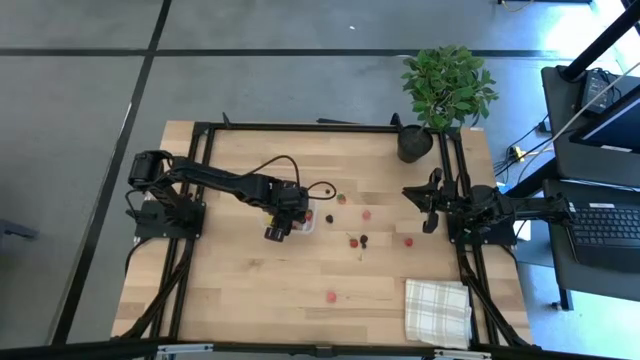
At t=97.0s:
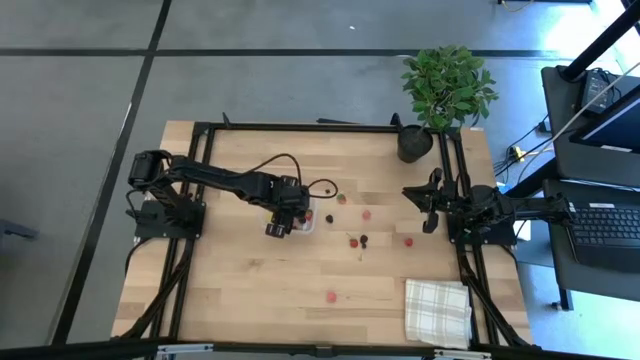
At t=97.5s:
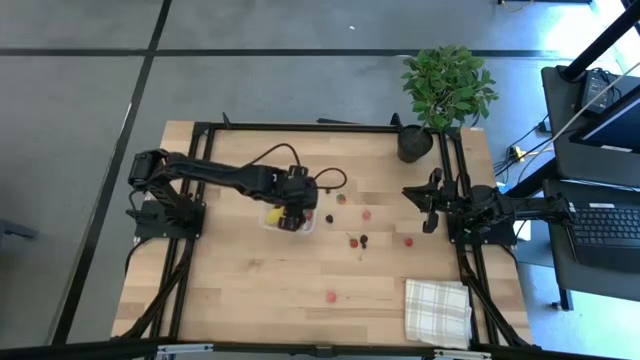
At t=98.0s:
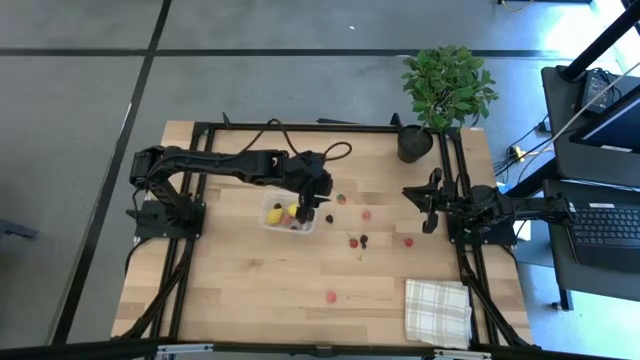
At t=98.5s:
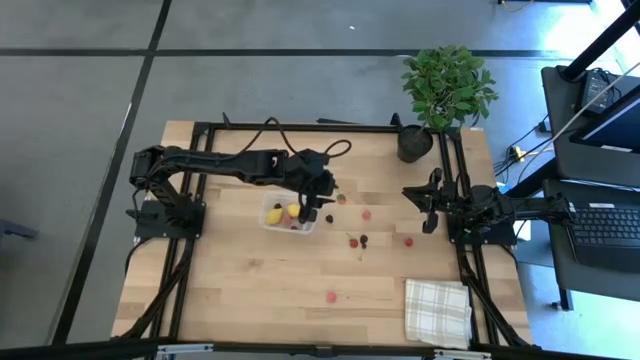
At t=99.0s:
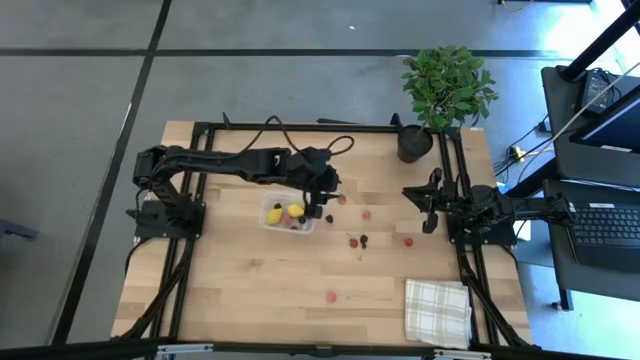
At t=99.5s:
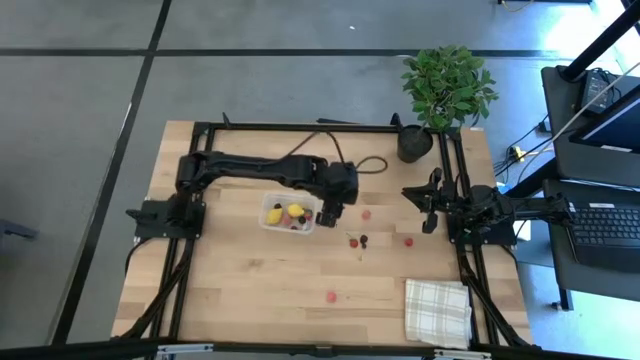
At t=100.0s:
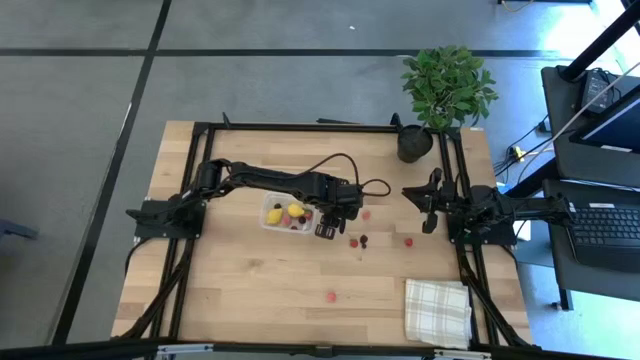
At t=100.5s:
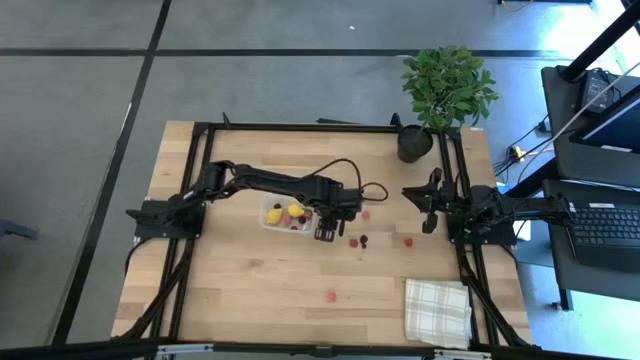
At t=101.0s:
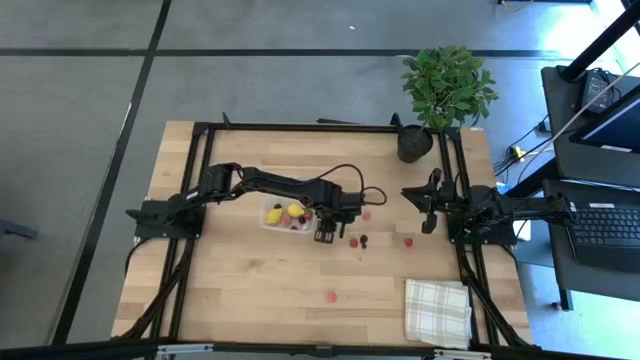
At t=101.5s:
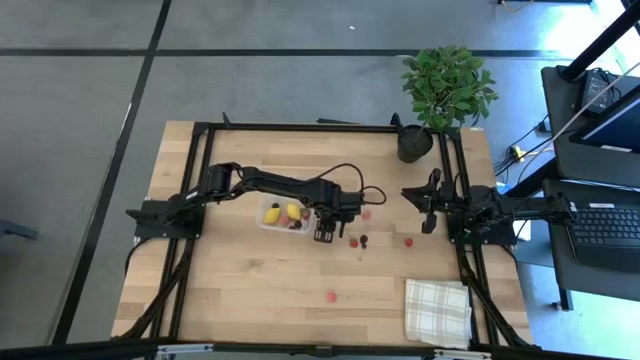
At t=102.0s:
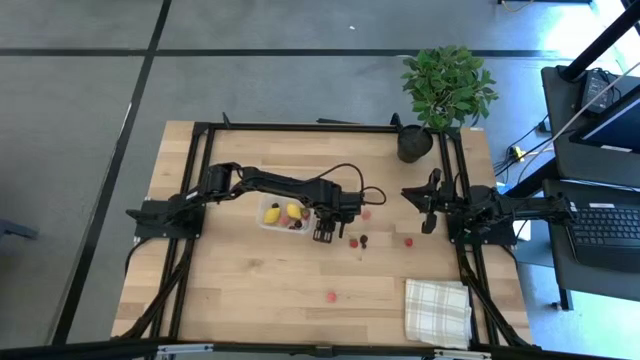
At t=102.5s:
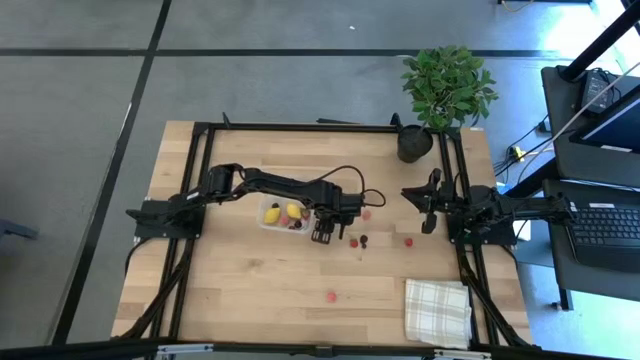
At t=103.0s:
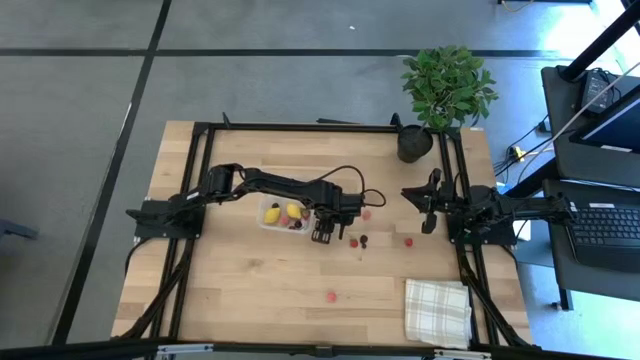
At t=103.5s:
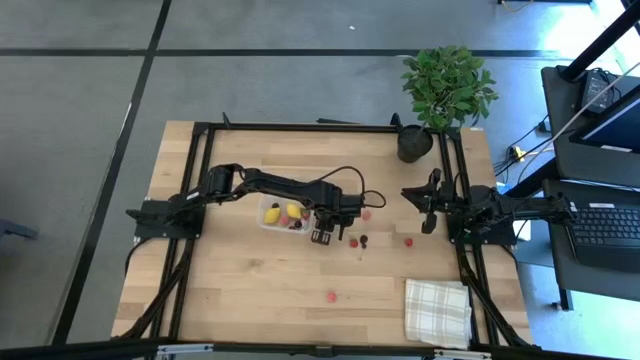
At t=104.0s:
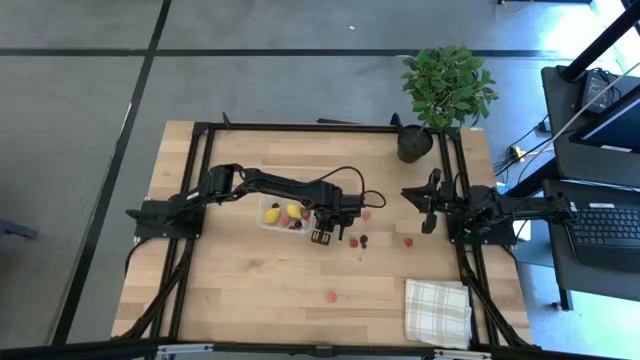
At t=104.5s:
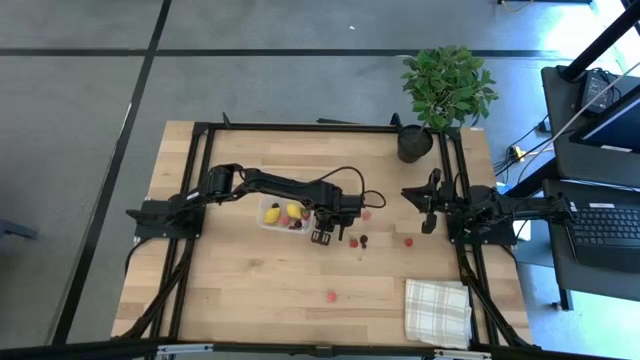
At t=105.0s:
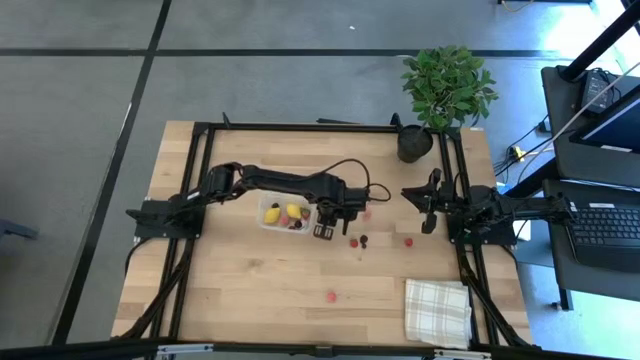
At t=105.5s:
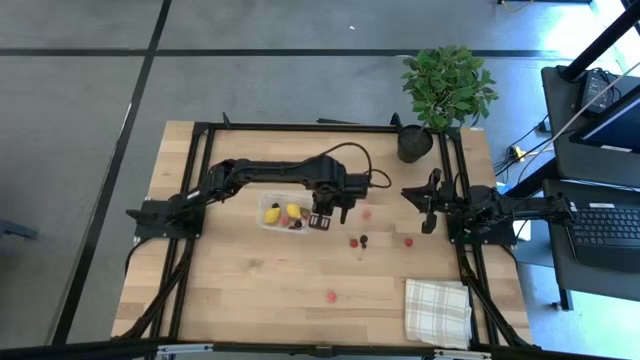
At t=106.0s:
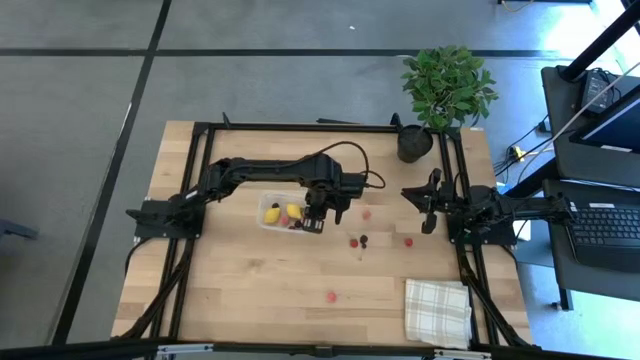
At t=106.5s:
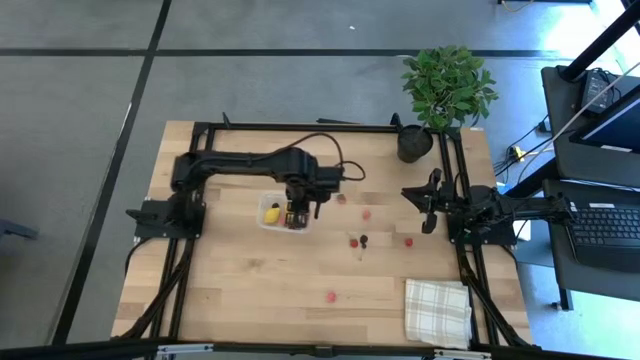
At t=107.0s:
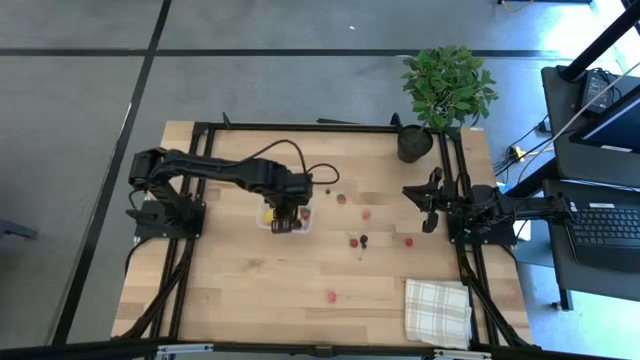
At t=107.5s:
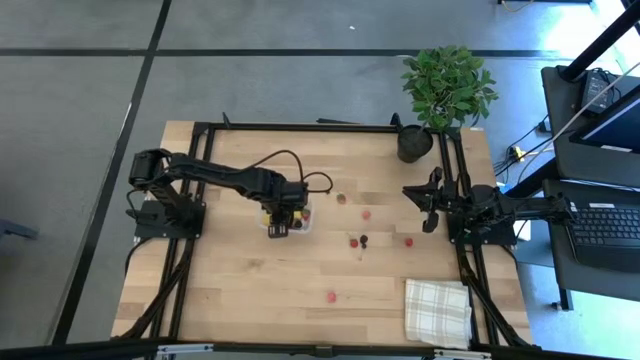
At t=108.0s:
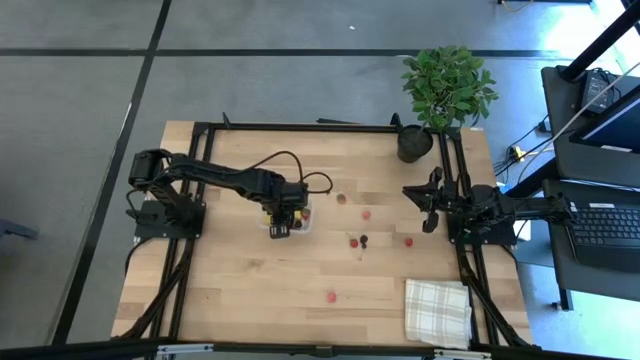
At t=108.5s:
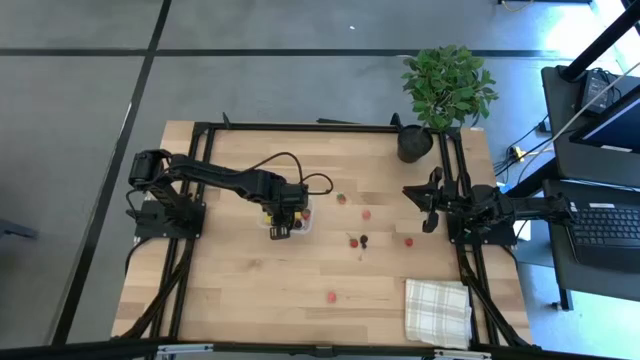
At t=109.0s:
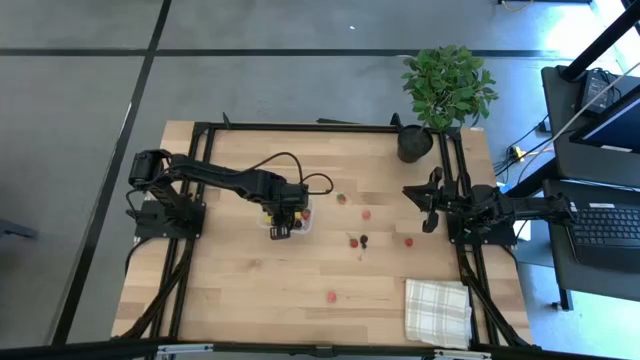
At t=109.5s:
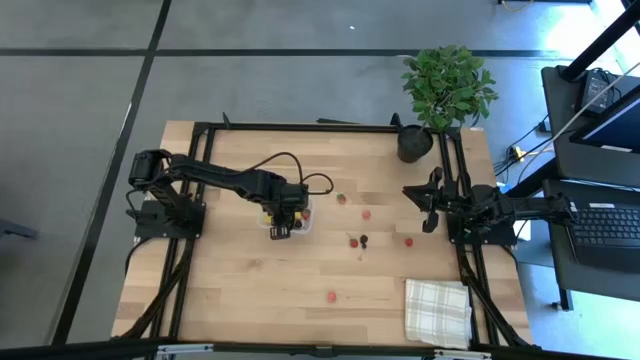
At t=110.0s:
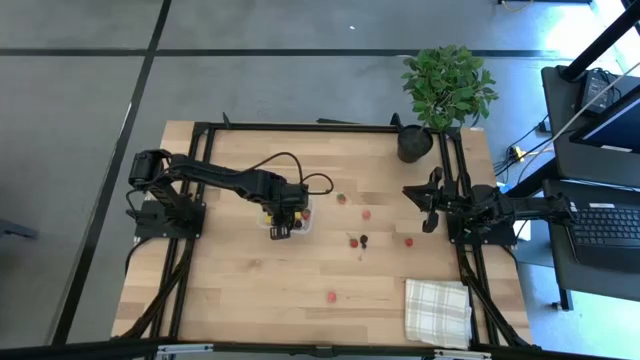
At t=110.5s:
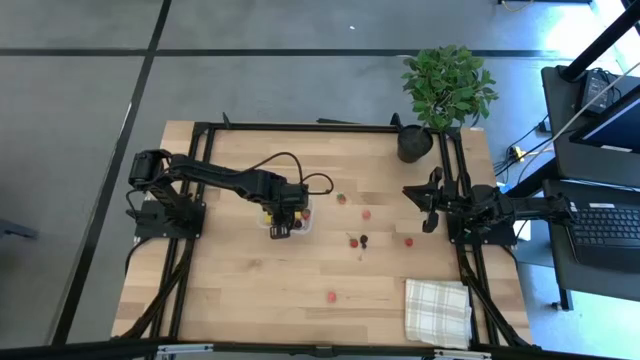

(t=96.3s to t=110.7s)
Task: Pick and placing Produce into tupperware
Put the left blackberry into the transparent bin

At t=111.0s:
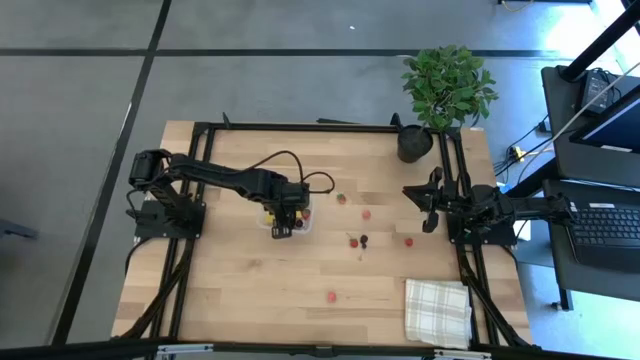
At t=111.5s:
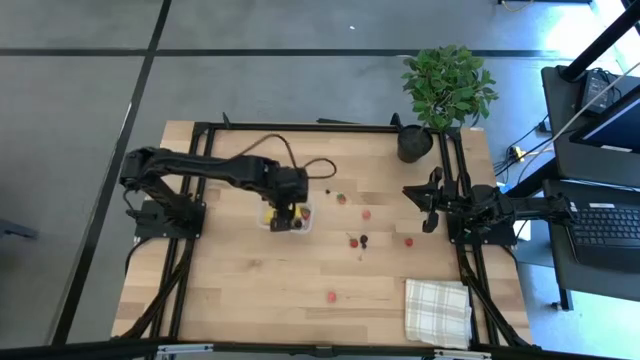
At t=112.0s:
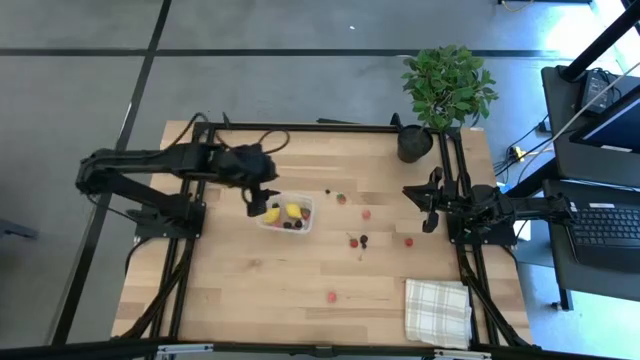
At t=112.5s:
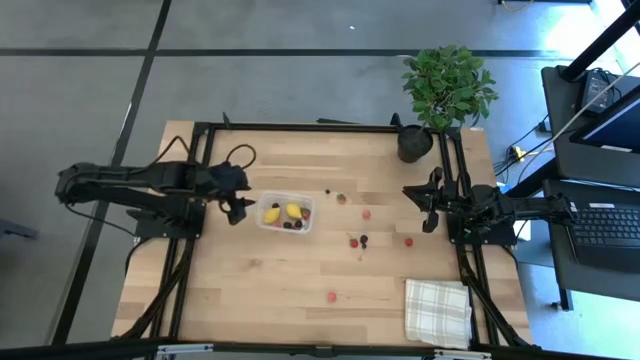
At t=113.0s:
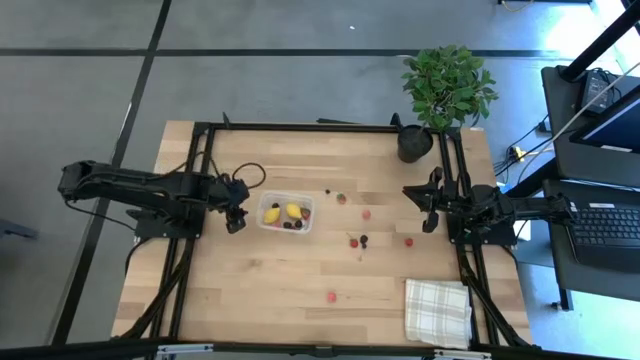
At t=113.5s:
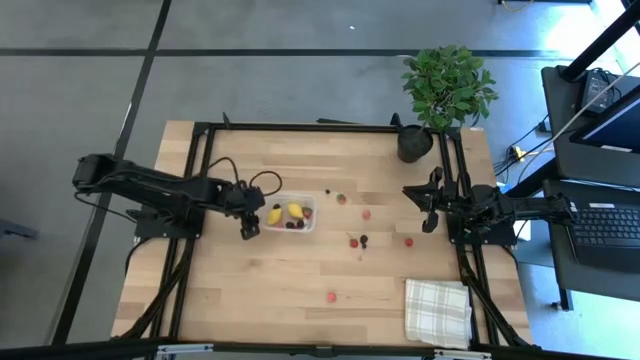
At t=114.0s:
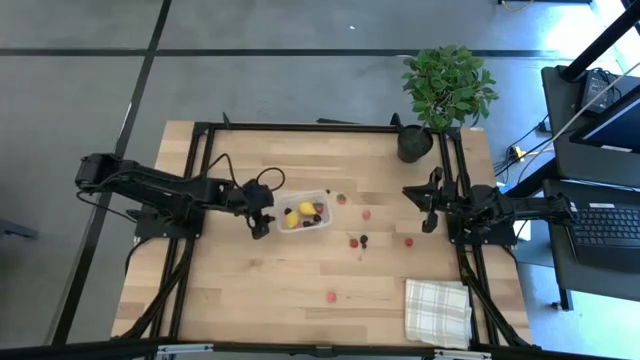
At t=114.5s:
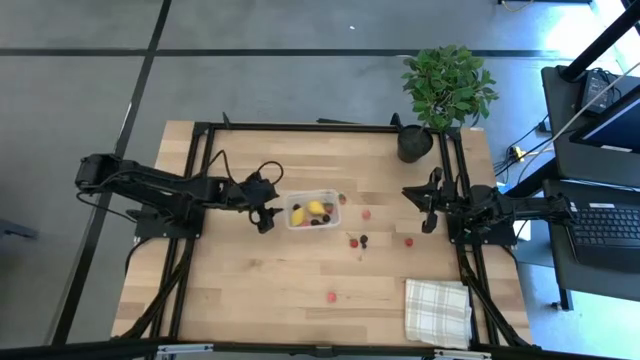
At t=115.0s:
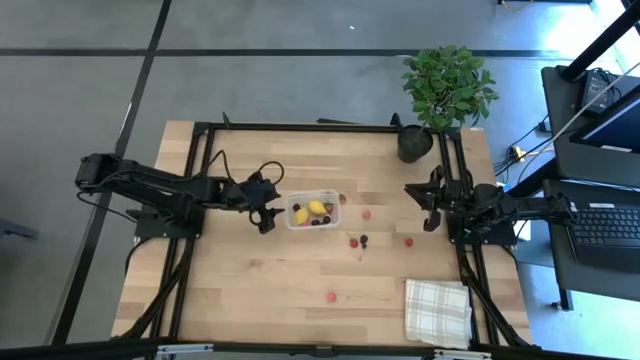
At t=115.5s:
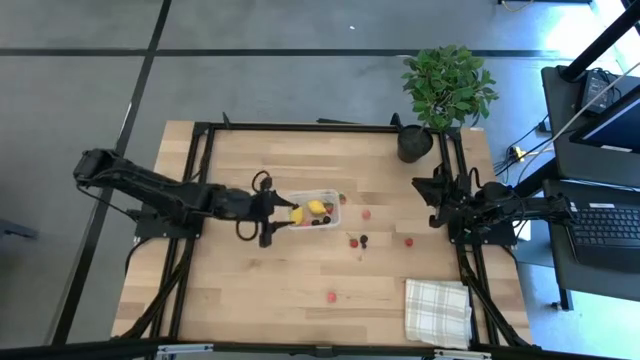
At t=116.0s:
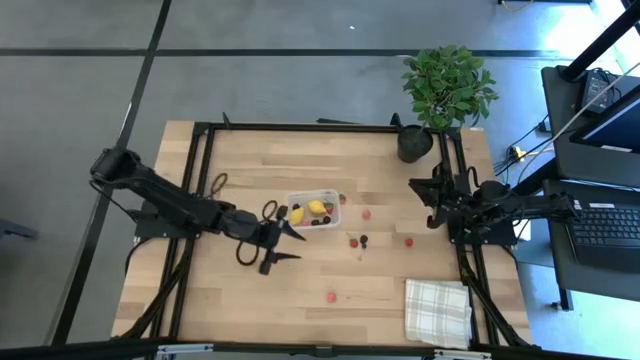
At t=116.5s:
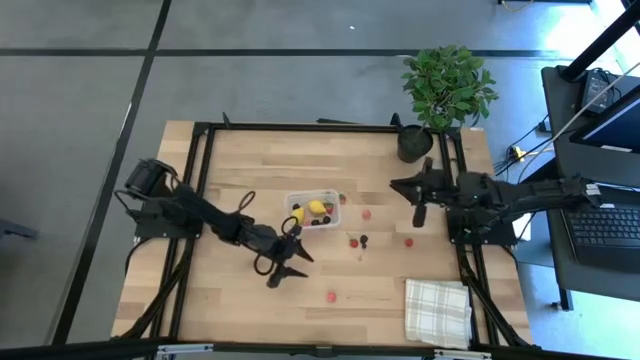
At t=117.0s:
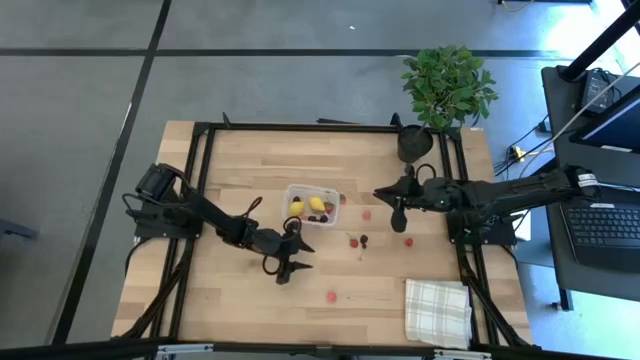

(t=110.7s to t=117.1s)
Adjust the transparent bin
